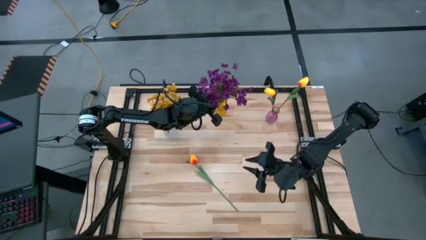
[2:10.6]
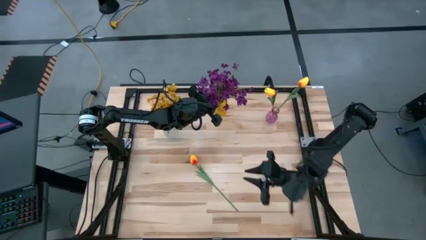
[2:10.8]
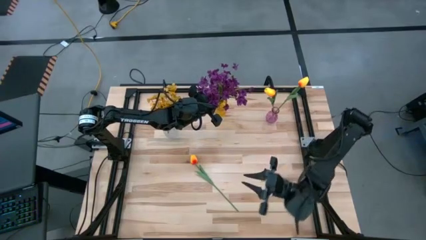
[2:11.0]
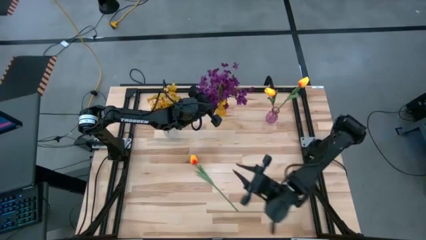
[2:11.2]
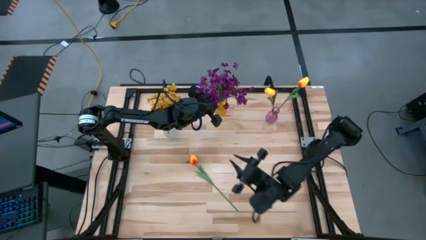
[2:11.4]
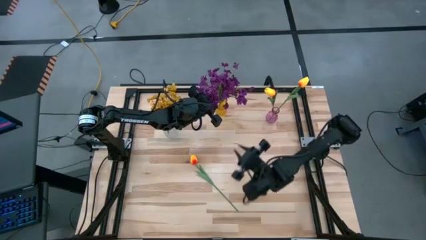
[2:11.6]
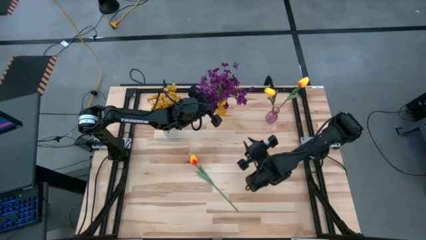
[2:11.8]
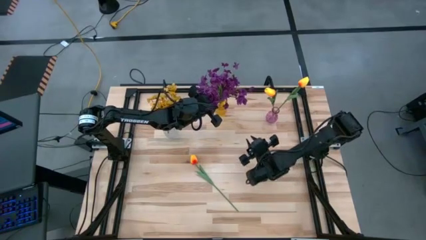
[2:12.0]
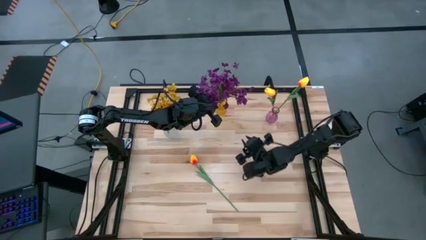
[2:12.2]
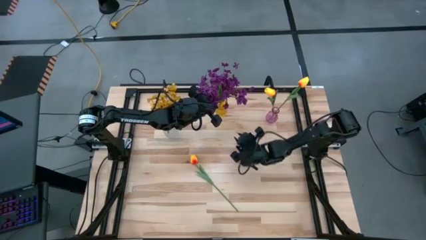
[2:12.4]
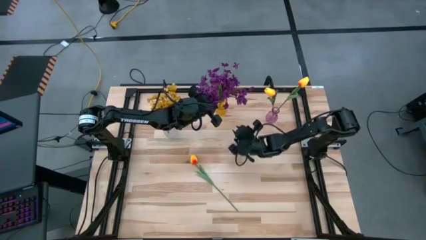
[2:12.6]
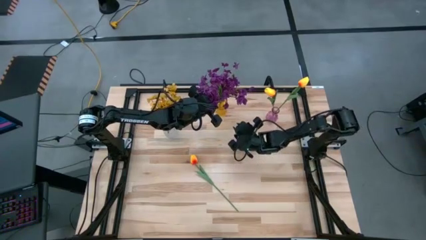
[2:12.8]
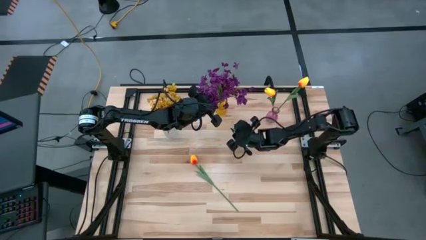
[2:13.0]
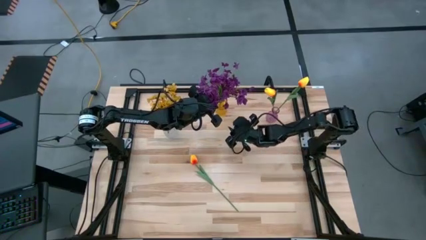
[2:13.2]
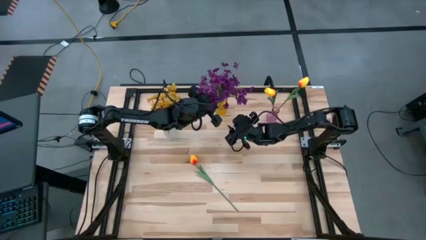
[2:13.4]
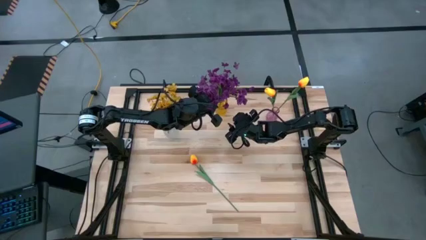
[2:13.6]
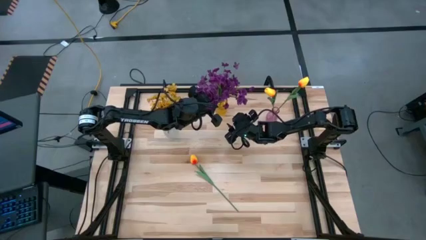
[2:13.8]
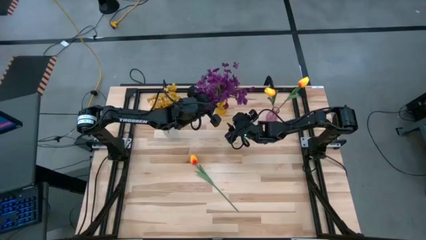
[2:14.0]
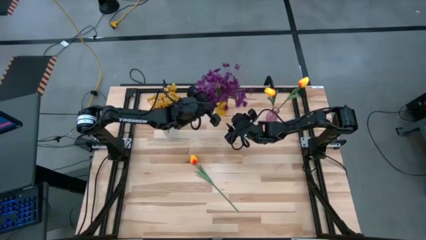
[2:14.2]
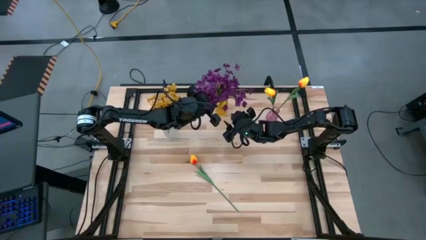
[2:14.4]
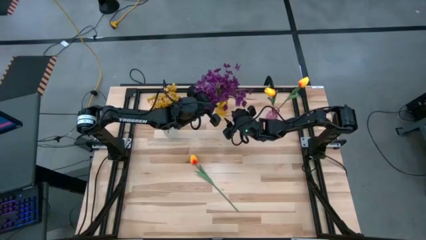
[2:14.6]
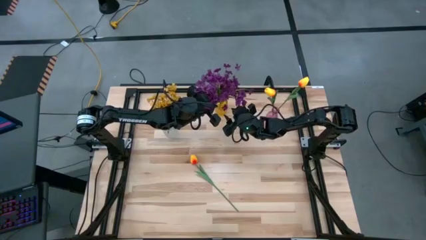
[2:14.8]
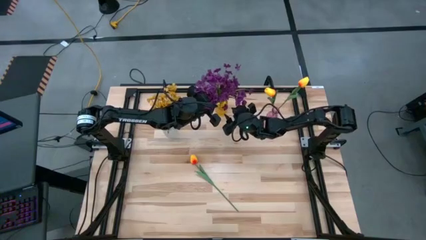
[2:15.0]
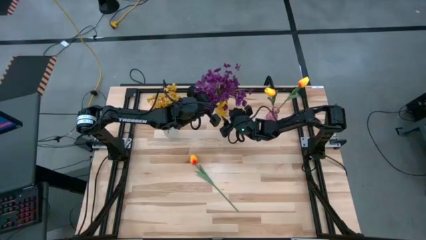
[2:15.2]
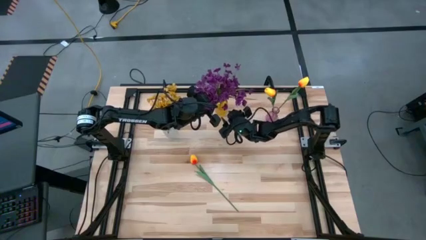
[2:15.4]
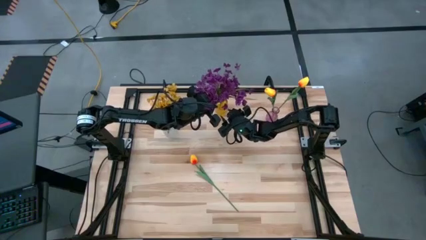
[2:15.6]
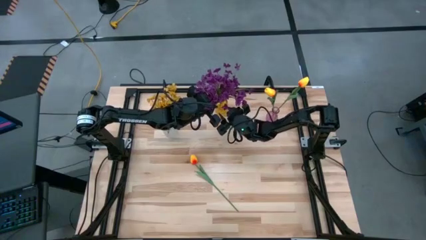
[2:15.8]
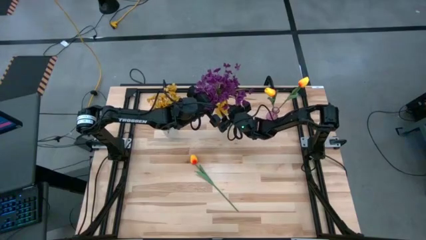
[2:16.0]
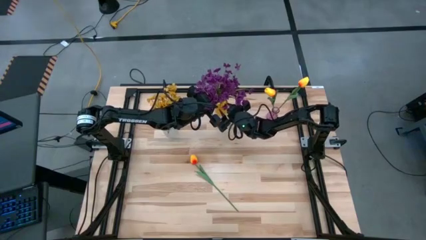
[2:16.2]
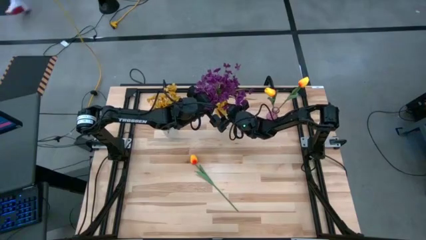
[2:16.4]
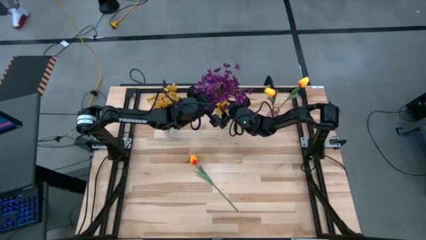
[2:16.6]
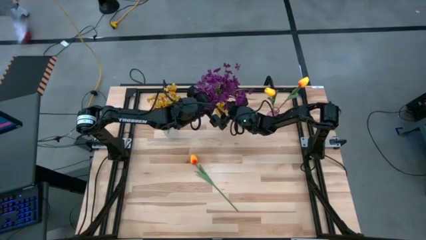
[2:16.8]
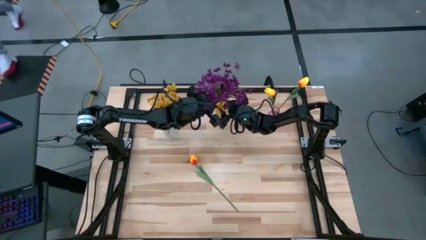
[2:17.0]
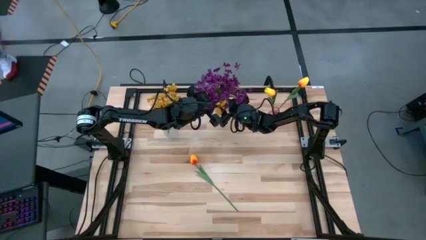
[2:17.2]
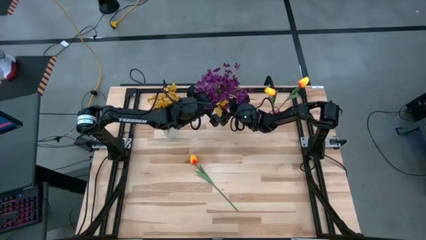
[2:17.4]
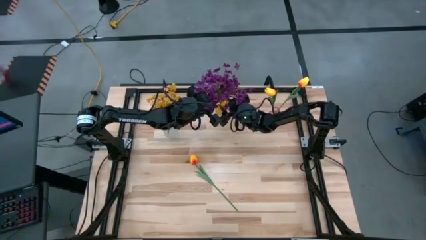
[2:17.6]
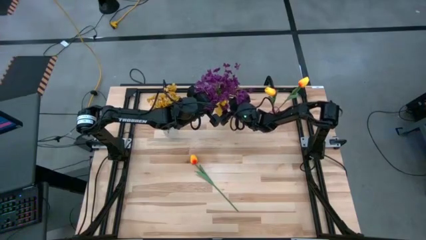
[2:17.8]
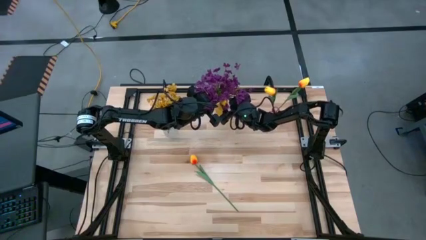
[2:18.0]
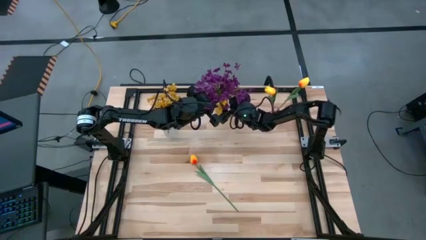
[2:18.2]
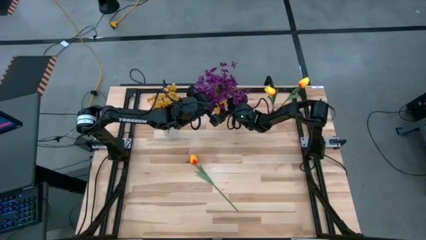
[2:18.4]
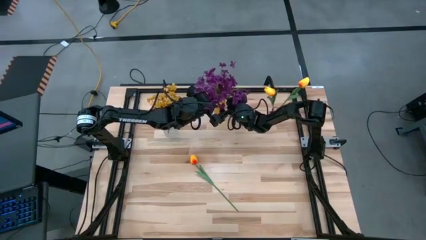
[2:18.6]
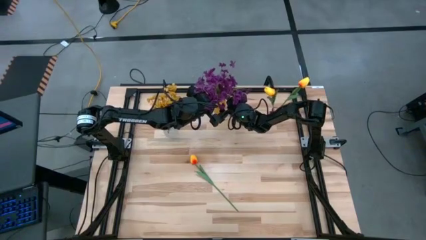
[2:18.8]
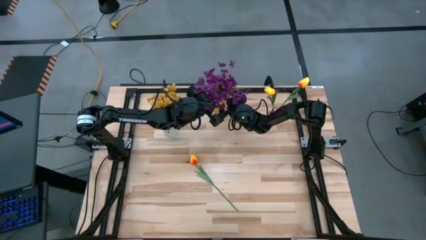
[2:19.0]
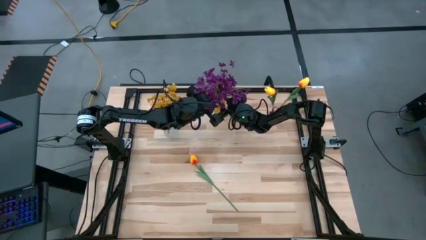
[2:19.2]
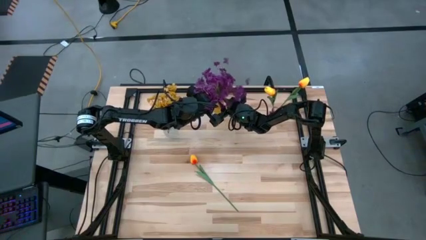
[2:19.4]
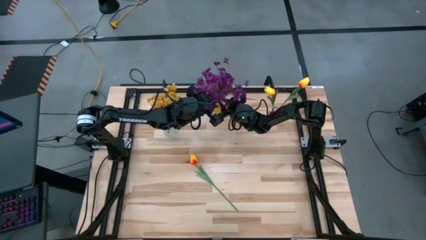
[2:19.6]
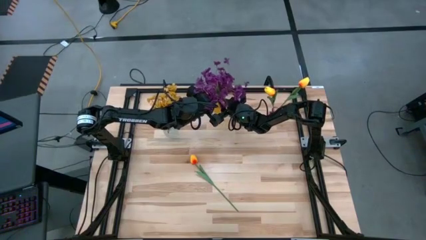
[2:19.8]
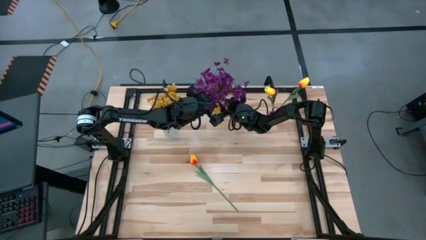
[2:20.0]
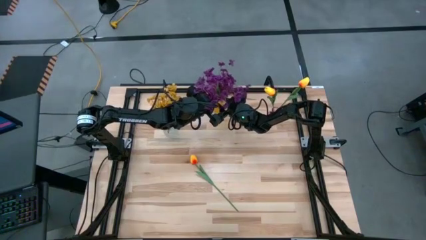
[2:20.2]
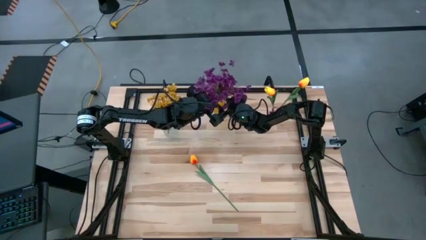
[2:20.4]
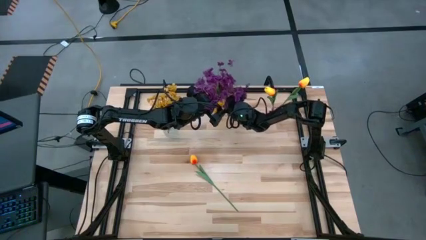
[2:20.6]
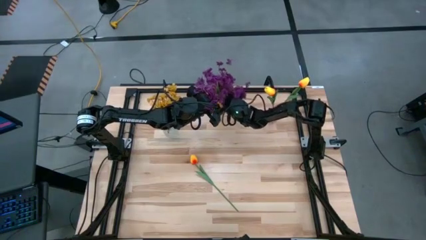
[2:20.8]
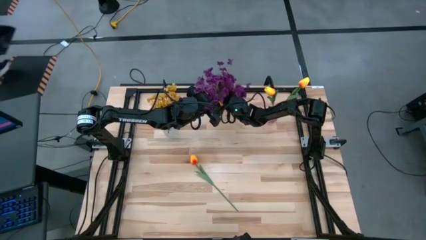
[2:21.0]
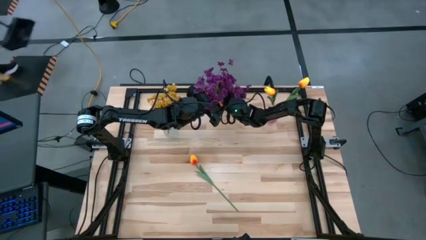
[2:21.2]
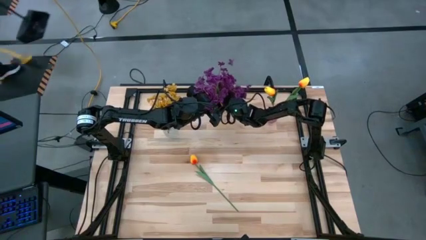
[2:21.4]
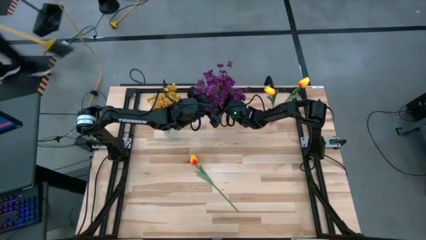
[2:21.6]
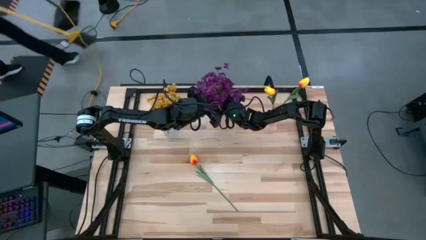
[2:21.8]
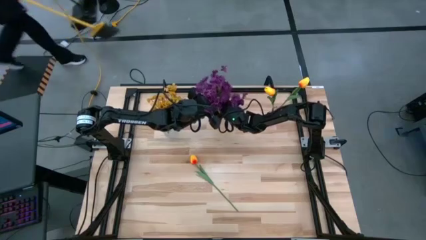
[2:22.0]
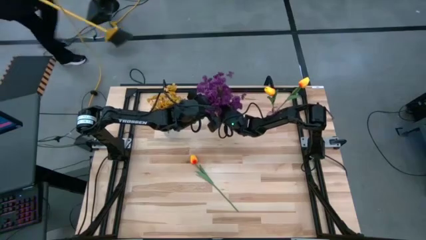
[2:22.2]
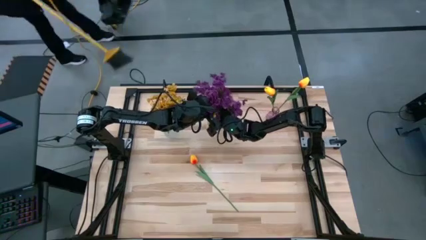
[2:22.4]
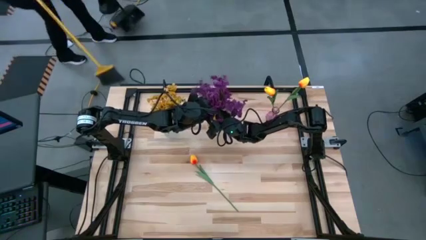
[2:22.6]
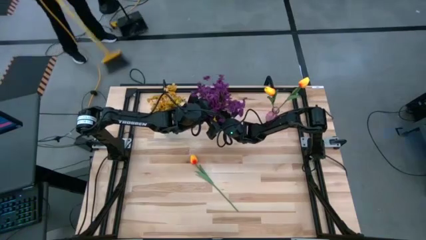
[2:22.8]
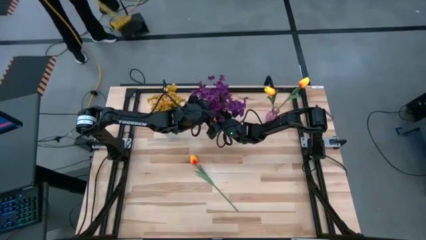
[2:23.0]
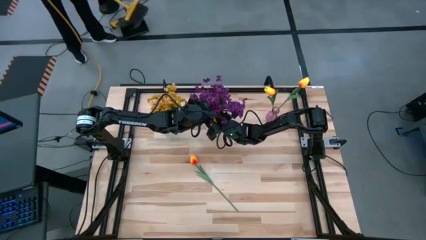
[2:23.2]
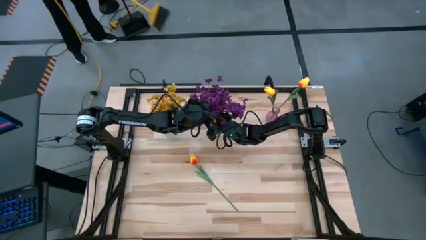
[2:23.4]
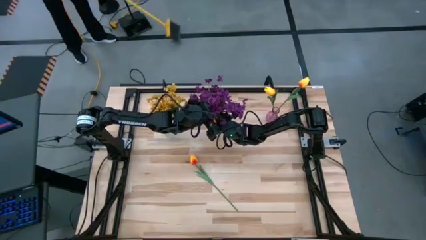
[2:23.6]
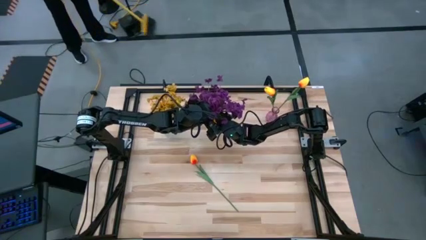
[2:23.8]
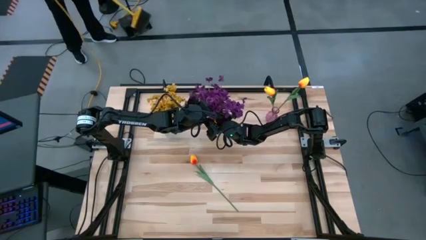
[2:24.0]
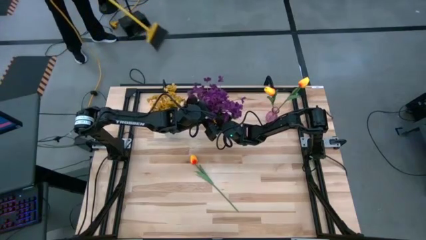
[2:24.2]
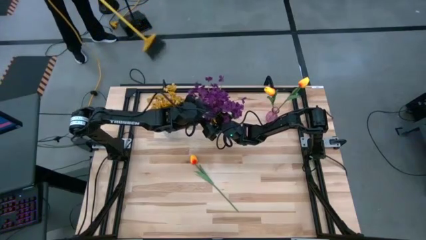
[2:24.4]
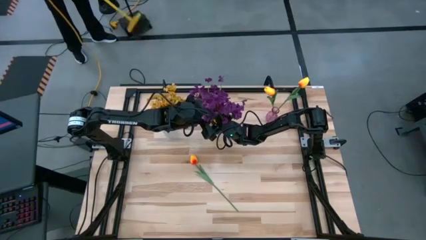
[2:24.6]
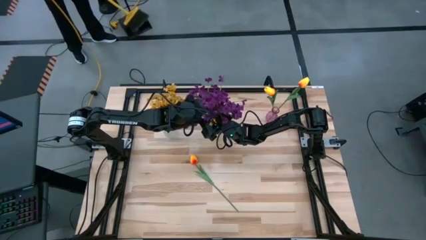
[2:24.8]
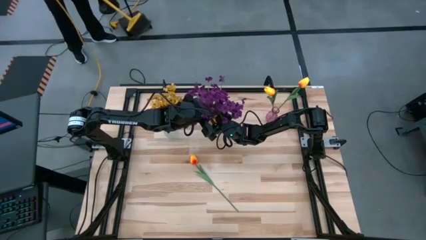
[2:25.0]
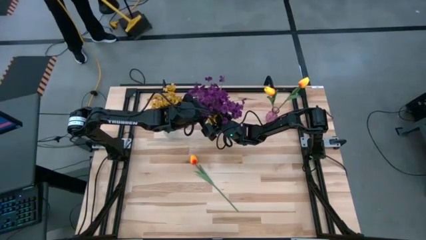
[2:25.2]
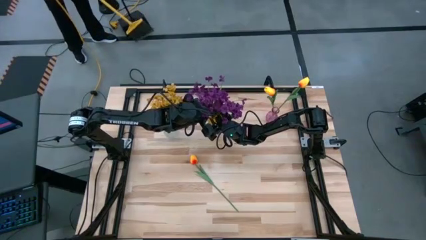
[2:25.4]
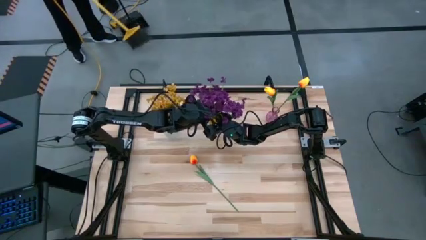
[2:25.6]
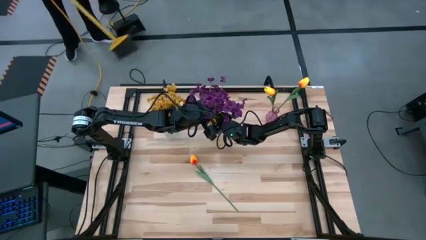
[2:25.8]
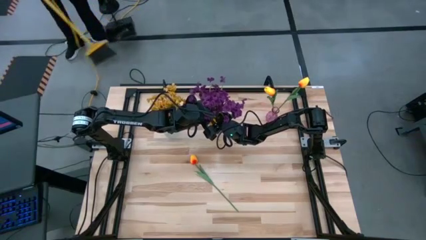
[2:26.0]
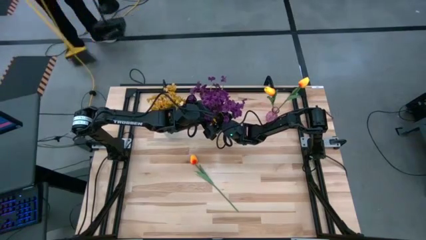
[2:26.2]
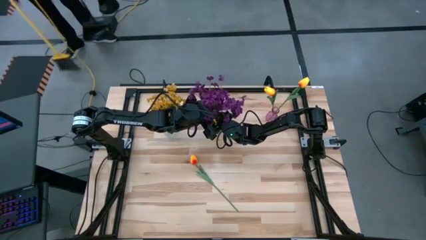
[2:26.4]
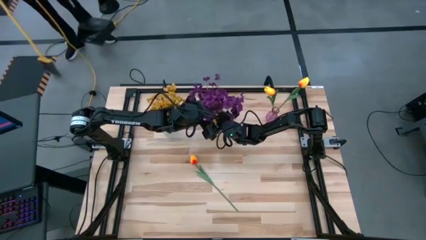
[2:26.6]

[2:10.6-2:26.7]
Task: Sort flowers into vase by color
Put the purple flowers into the yellow vase
